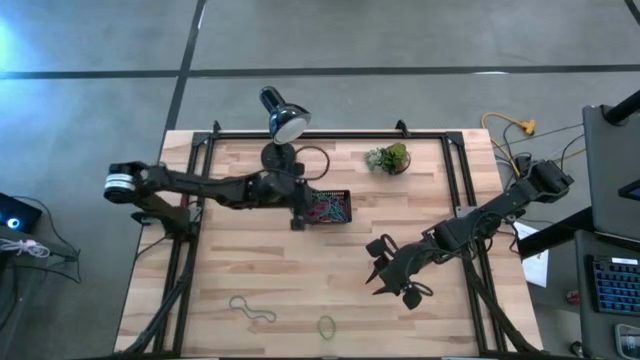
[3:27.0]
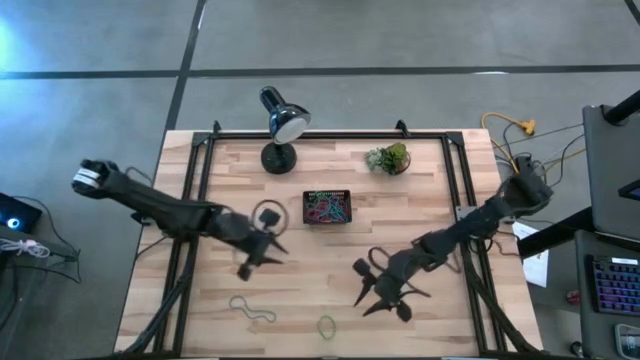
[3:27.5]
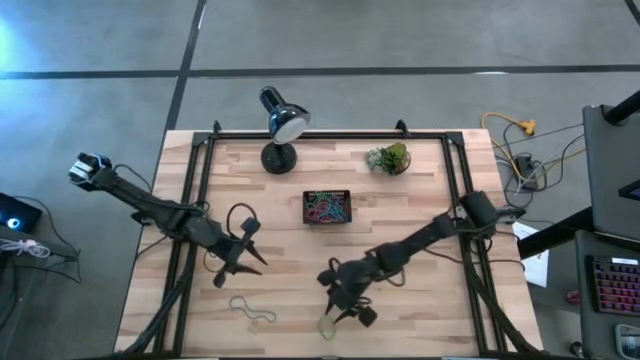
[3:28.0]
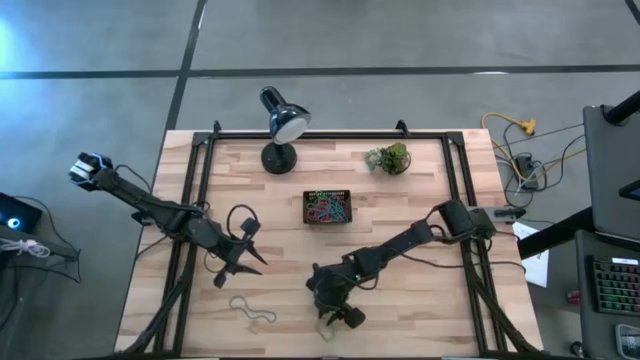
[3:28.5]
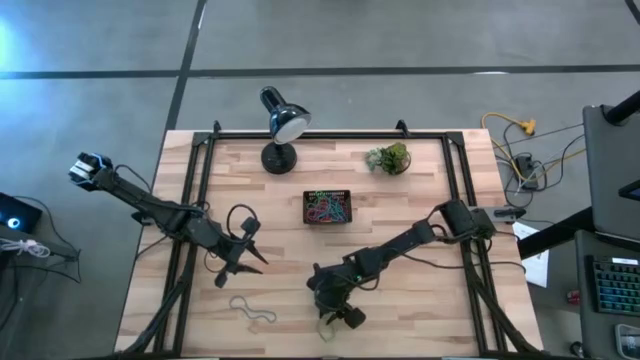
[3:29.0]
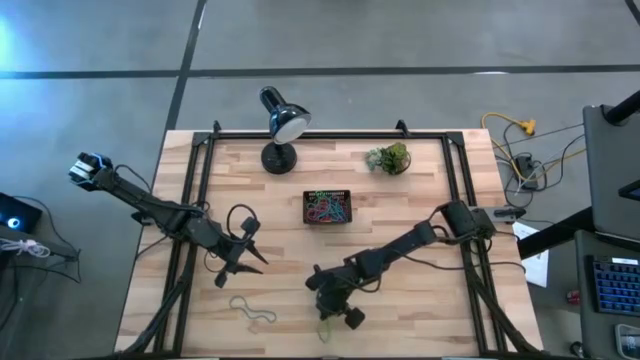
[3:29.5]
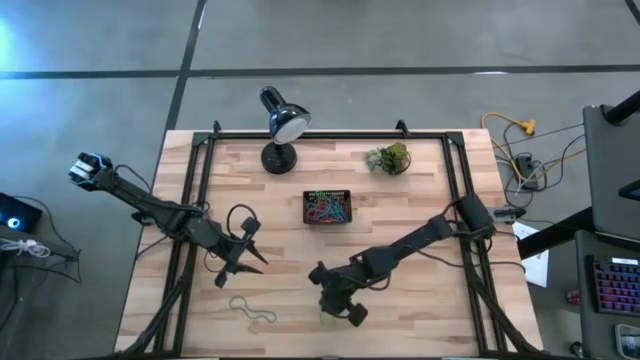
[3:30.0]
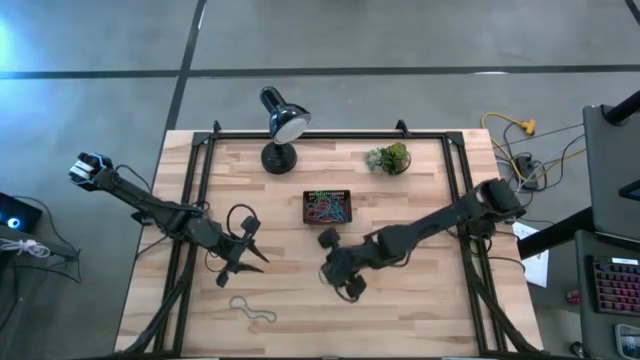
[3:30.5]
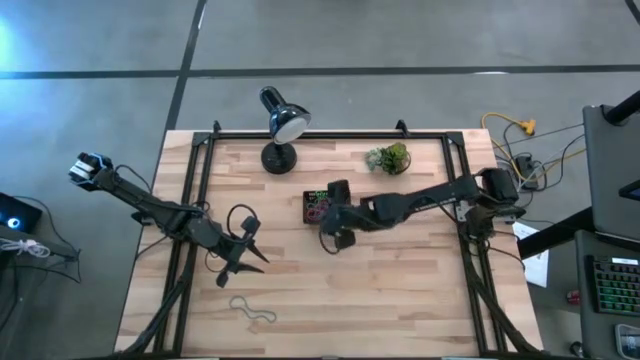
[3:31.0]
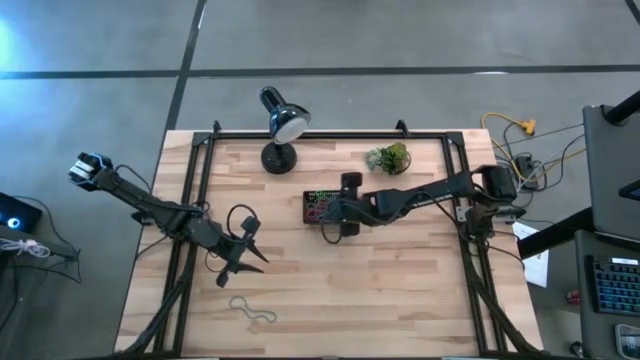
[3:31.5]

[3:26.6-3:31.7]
Task: Pick and place rubber bands into bin
Put the green rubber band into the black bin

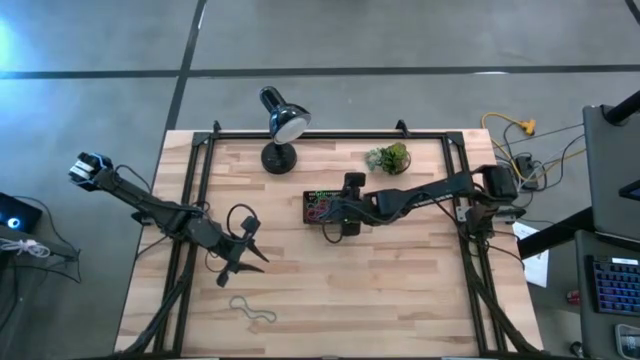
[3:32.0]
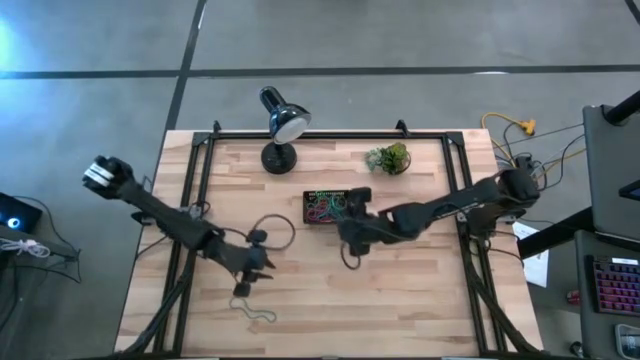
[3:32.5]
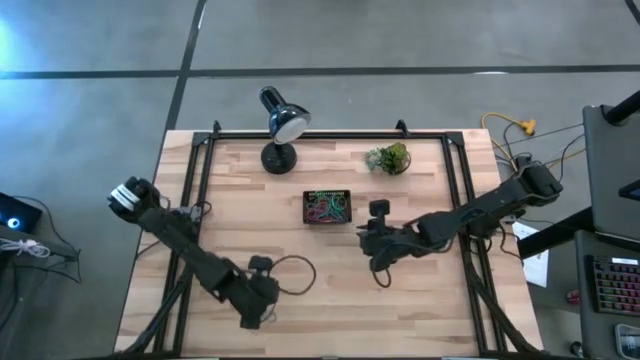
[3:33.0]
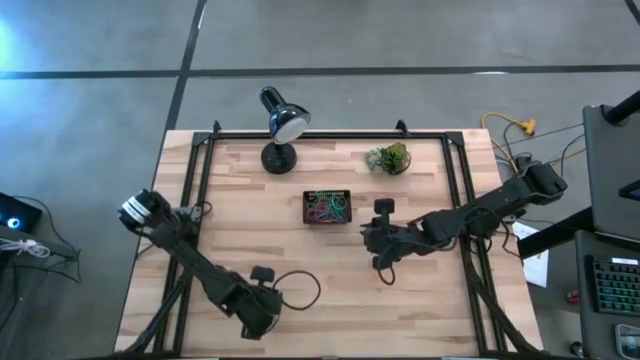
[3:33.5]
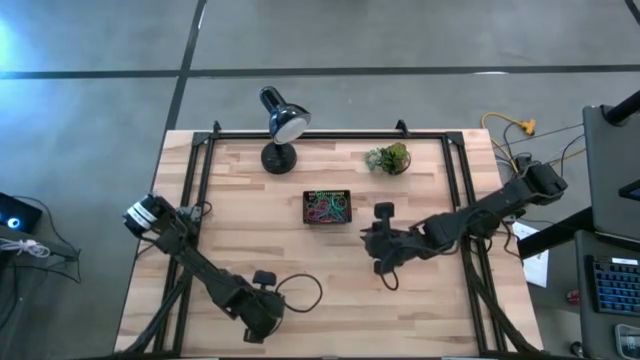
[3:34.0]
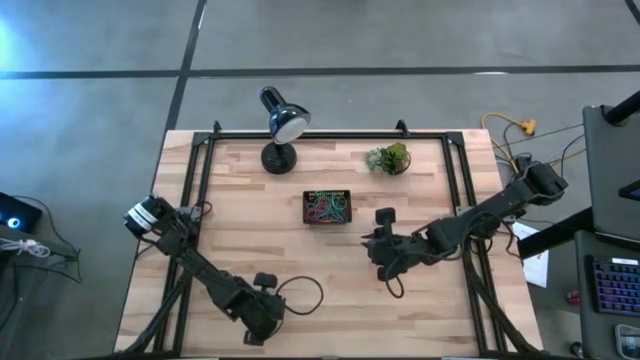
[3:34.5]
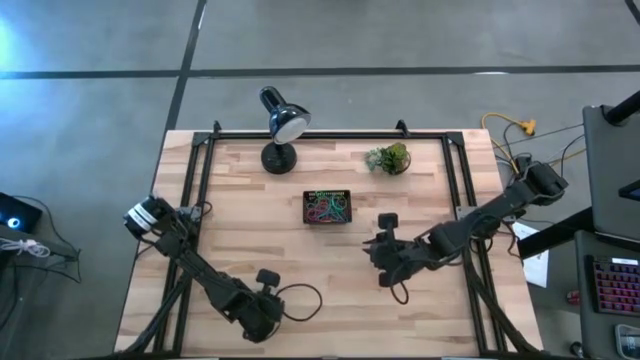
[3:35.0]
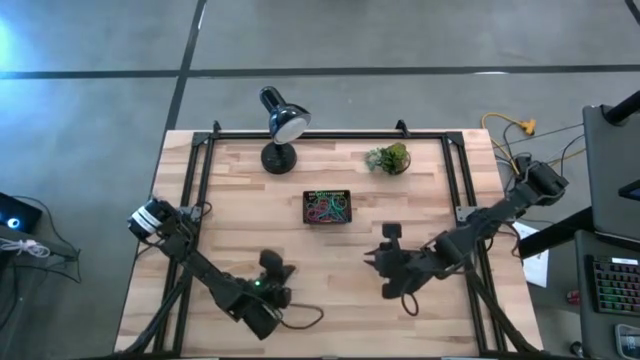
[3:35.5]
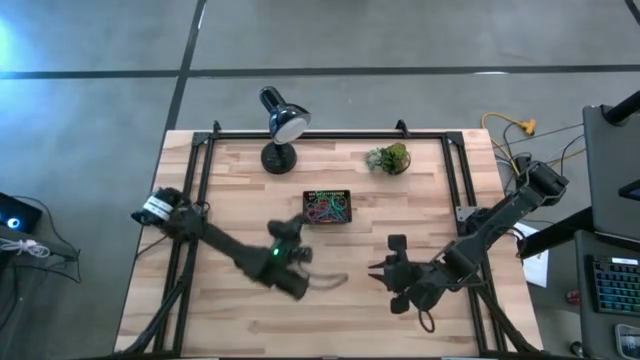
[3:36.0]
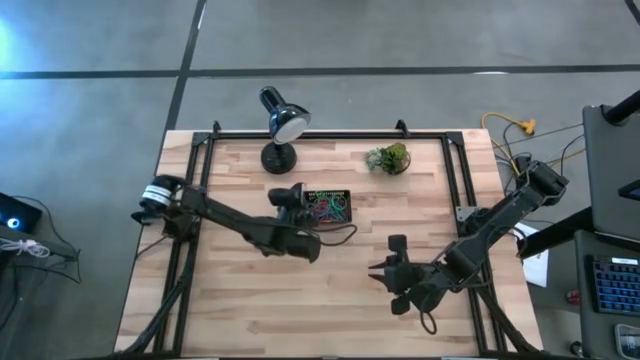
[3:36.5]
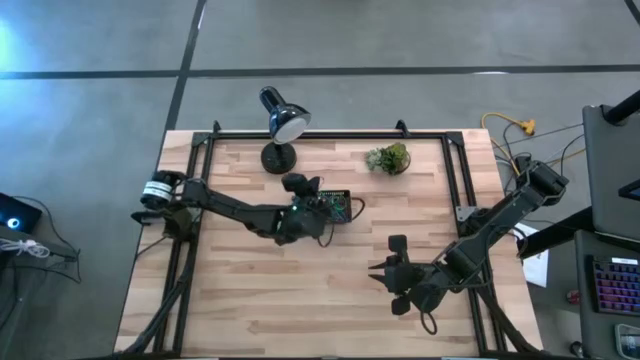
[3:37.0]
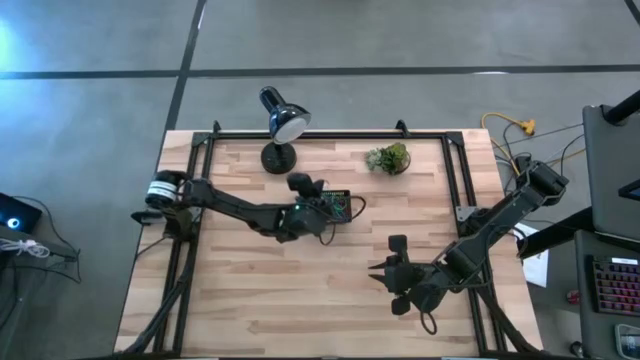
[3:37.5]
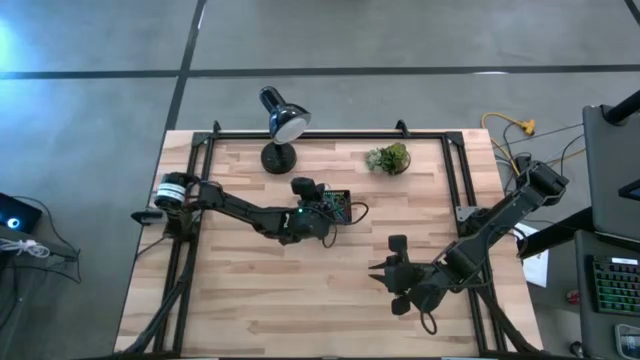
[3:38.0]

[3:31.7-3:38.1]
Put the blue rubber band into the black bin

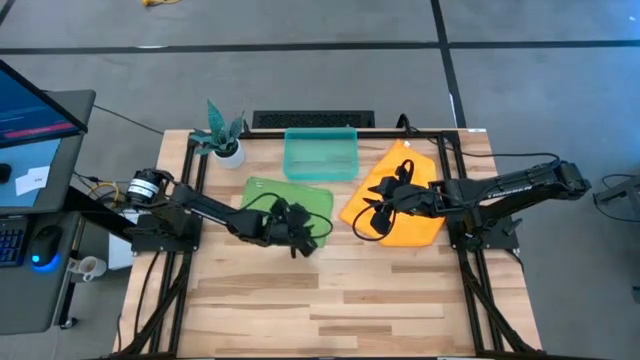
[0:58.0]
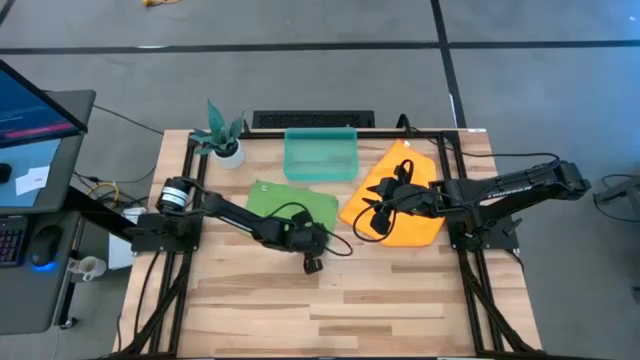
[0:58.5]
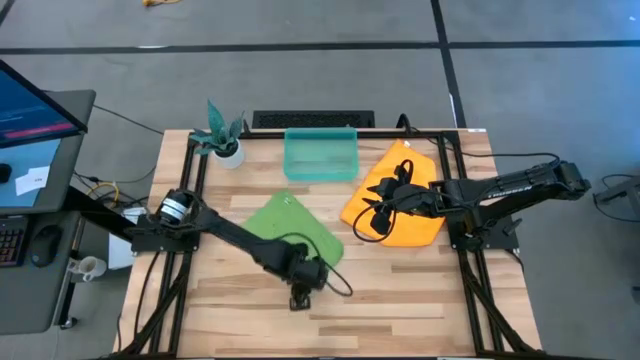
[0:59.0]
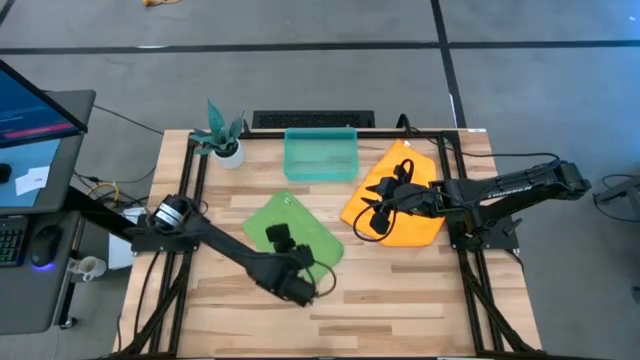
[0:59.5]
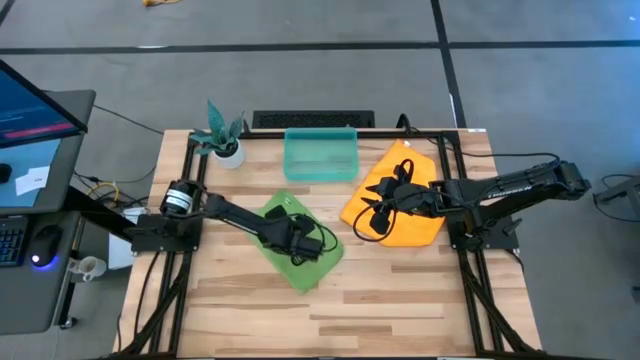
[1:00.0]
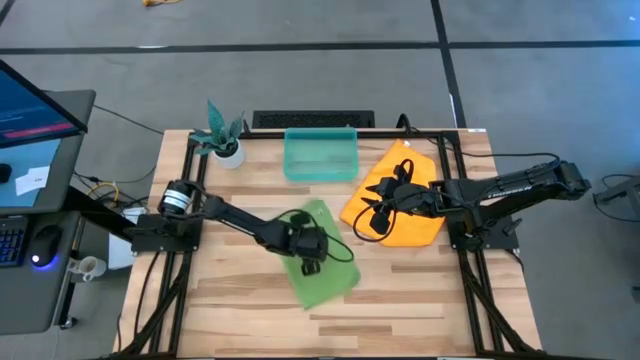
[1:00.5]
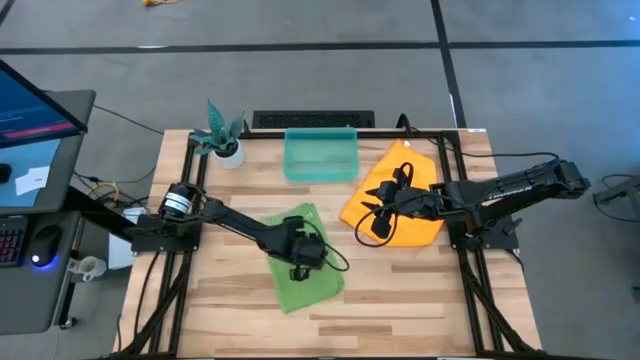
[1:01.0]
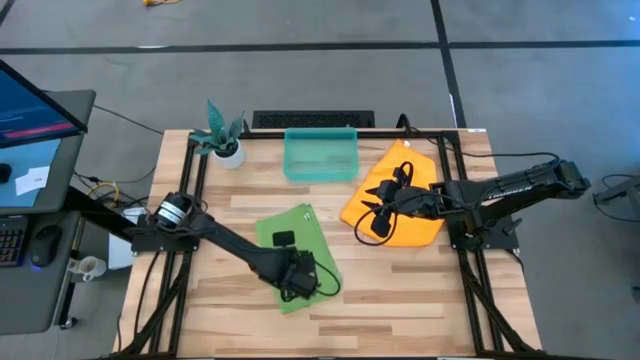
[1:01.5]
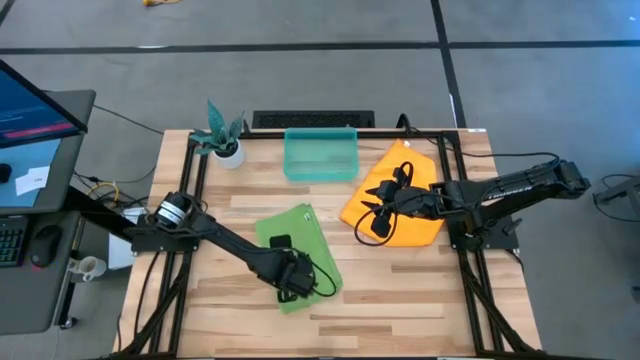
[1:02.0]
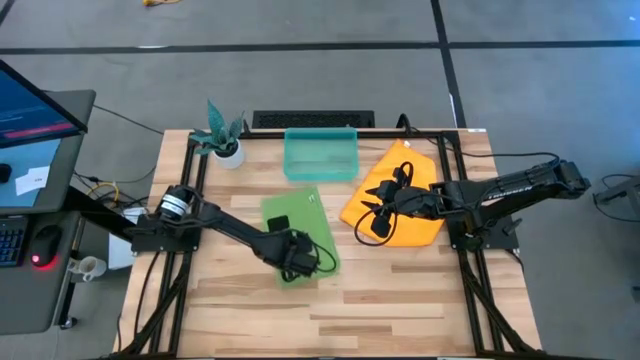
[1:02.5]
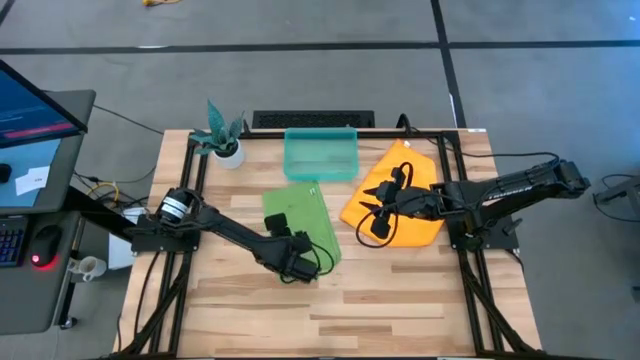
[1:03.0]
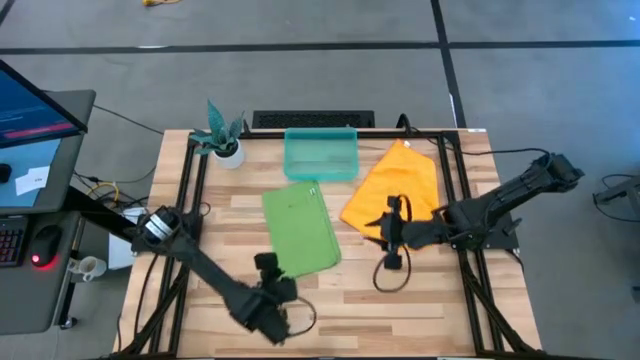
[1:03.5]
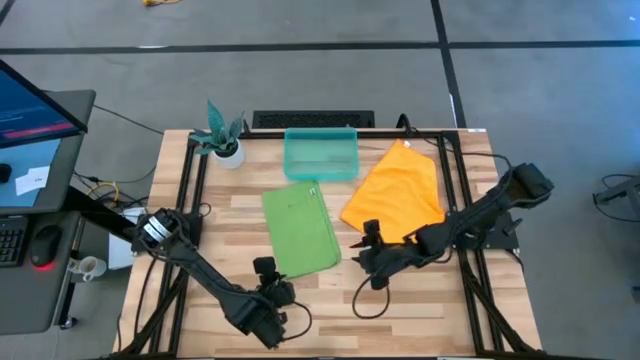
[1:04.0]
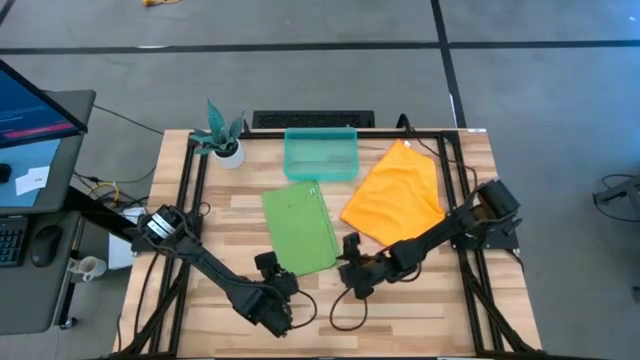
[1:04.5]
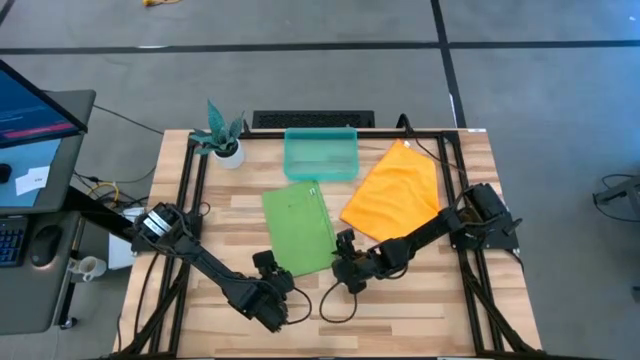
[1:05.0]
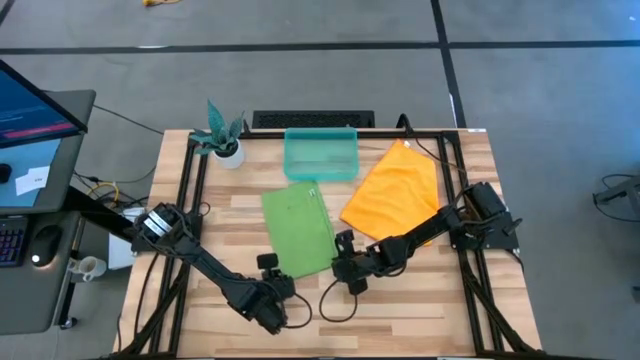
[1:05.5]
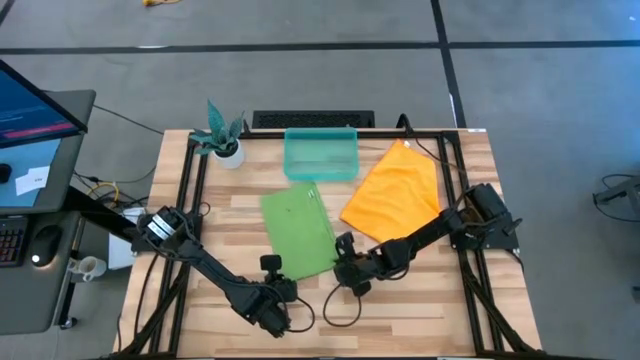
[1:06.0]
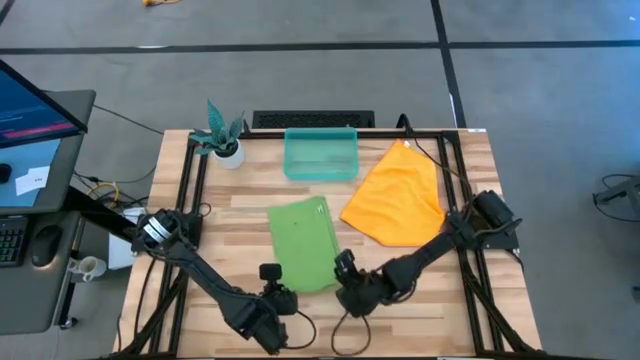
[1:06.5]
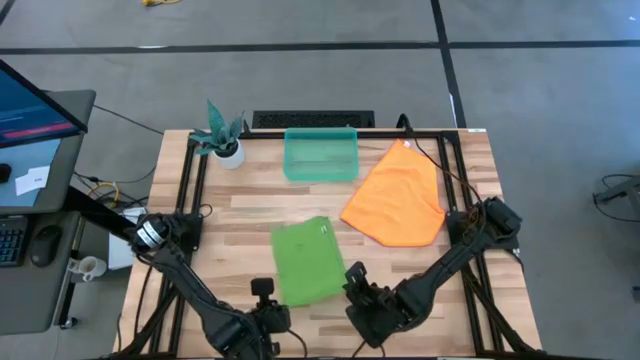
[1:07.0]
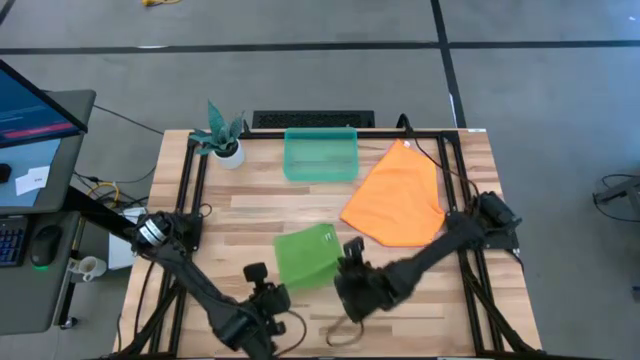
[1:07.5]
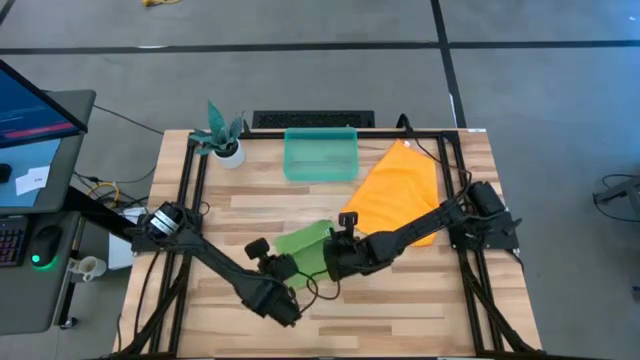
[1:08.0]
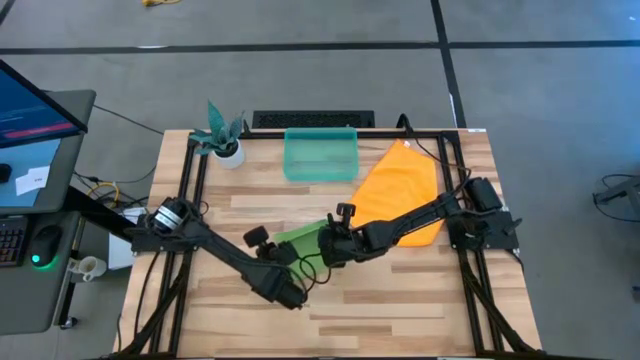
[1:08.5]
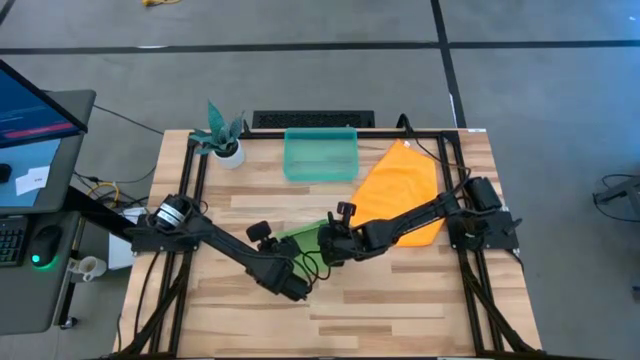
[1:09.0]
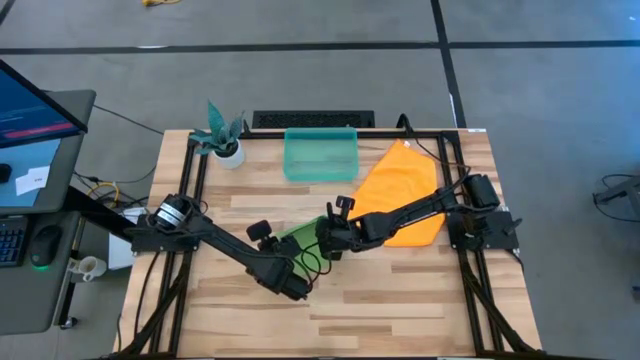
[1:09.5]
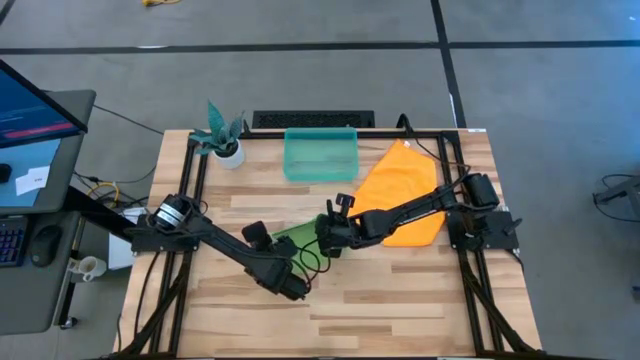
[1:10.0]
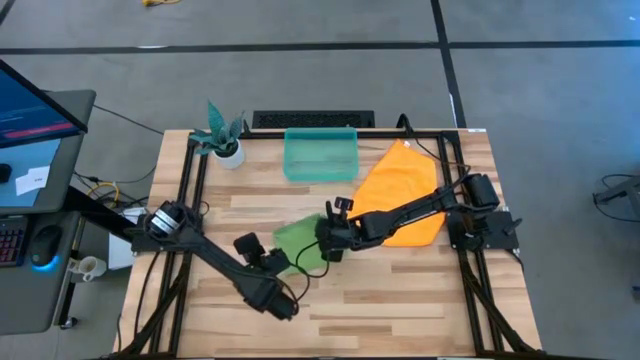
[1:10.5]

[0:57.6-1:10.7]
Task: Roll microfiber towels into tight, uniform cylinder then place into a basket
Fold the green towel
